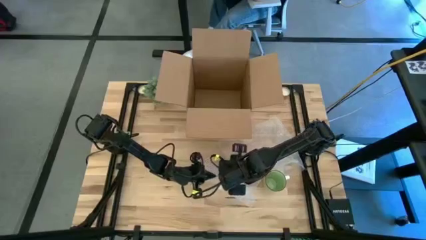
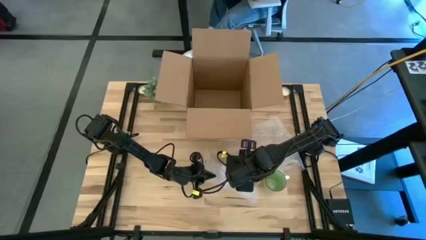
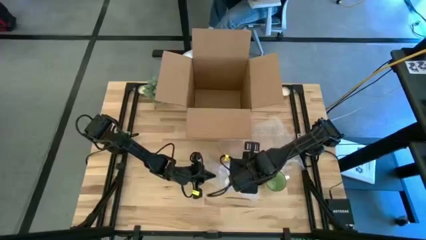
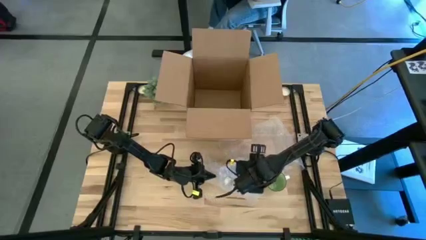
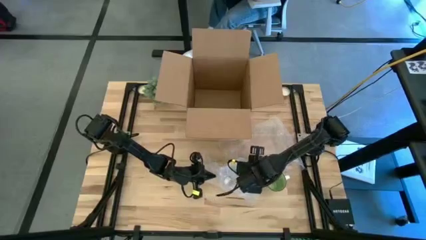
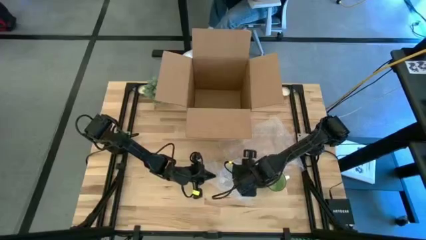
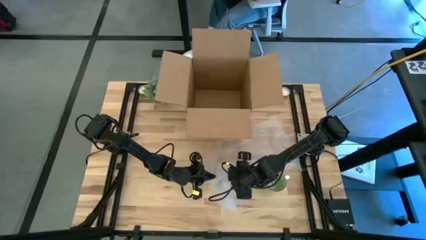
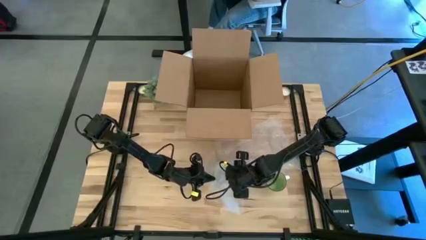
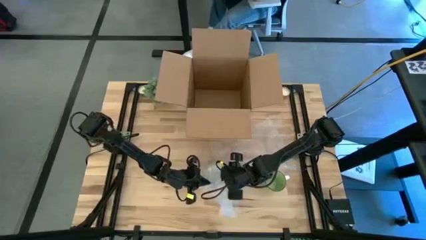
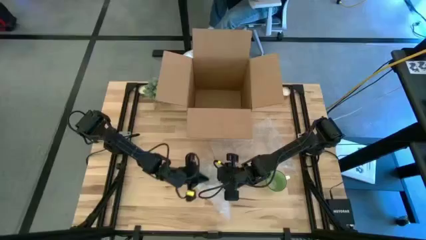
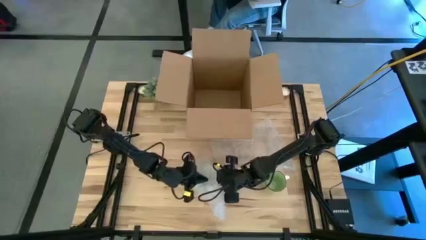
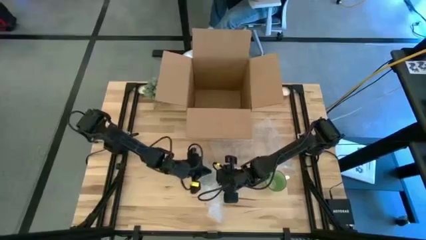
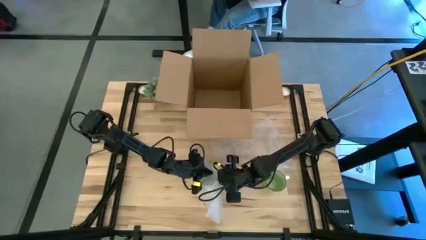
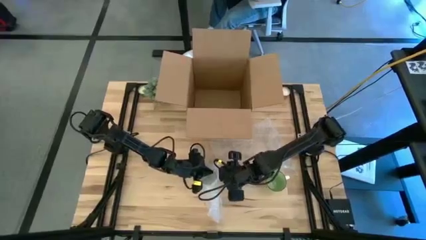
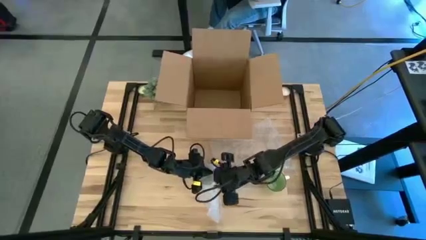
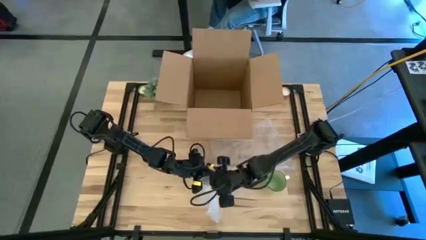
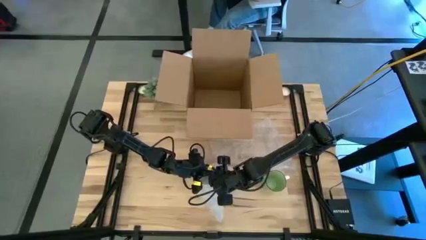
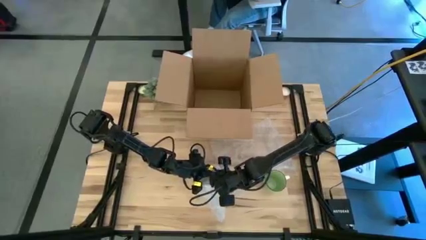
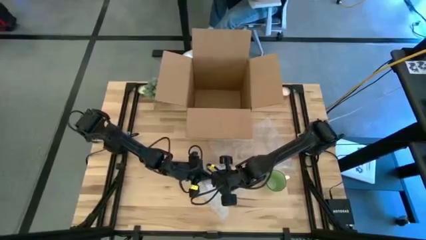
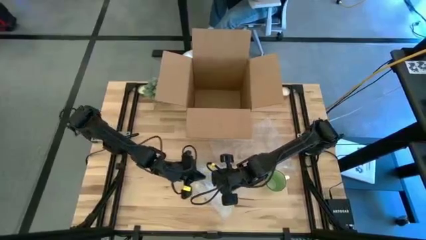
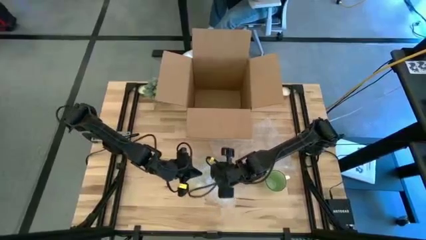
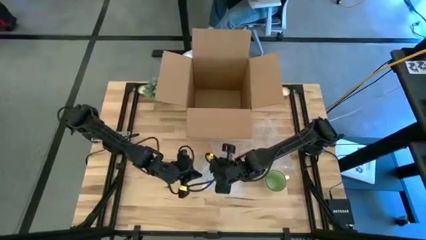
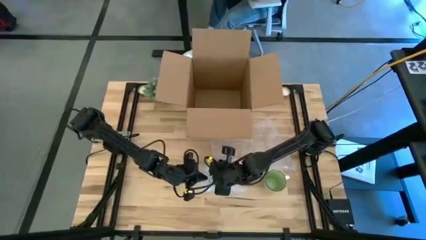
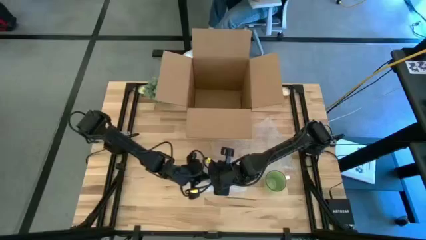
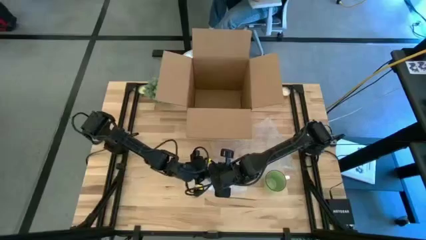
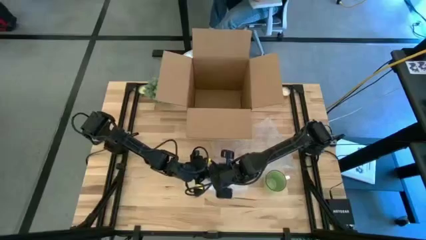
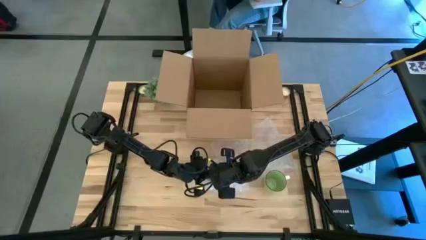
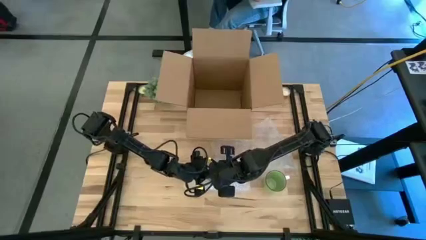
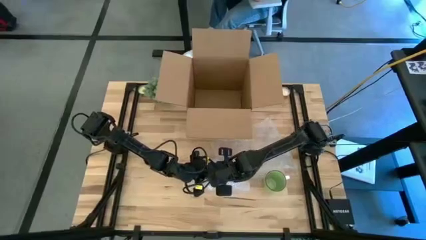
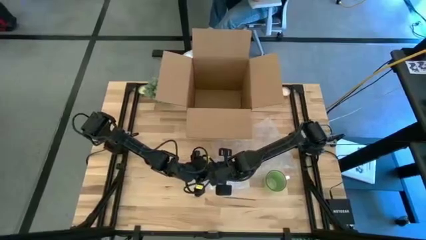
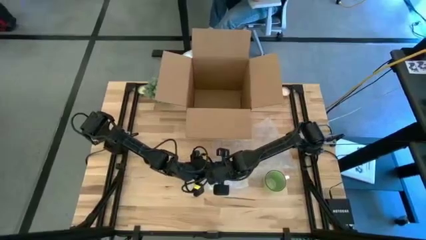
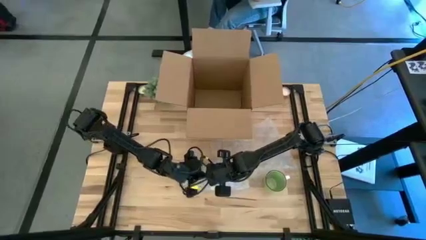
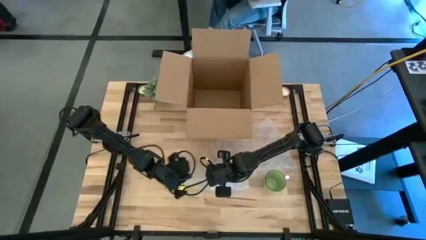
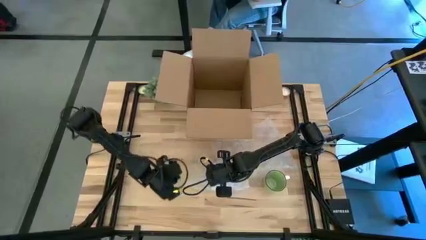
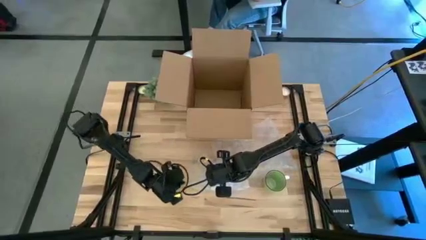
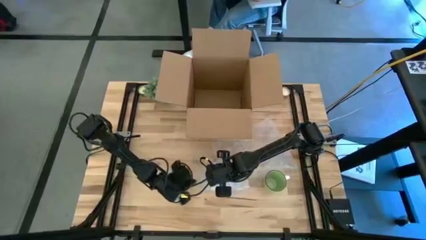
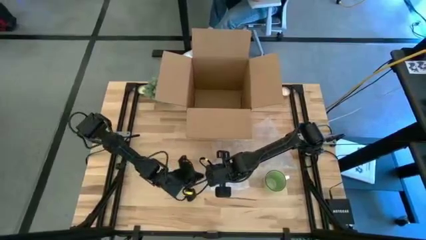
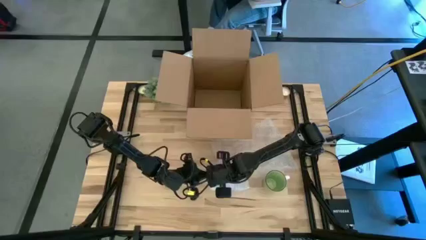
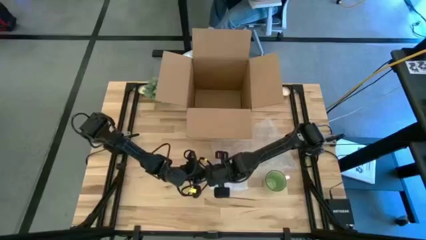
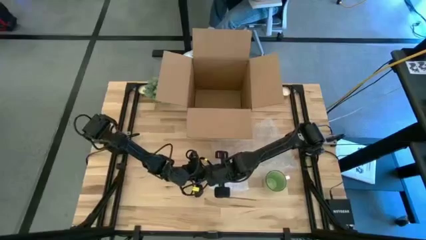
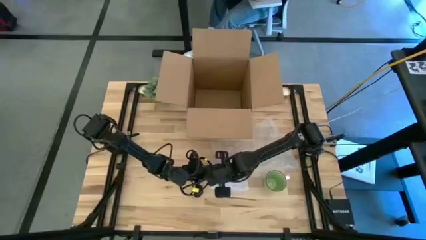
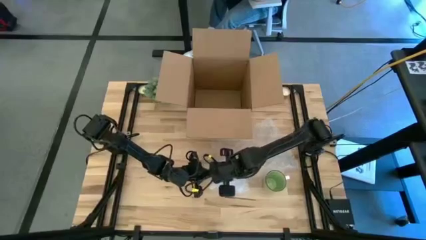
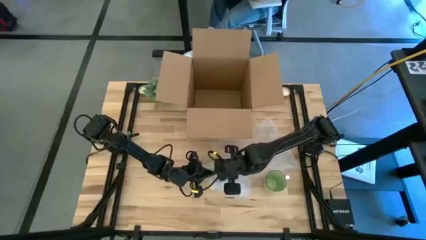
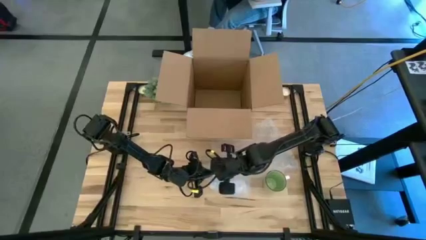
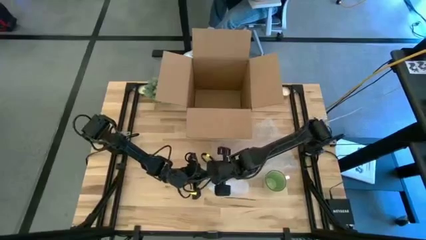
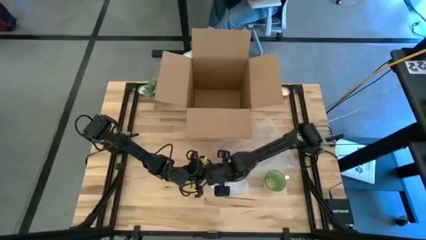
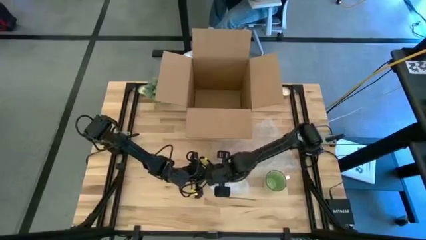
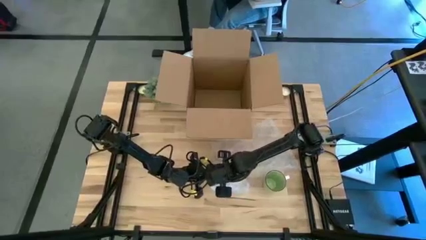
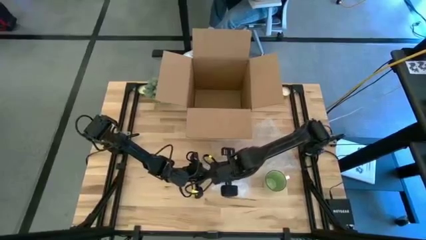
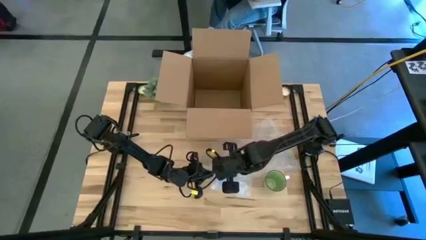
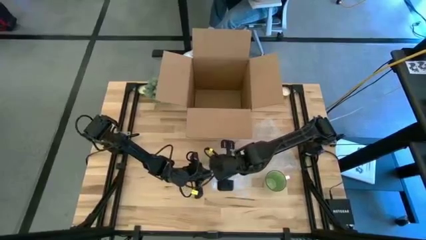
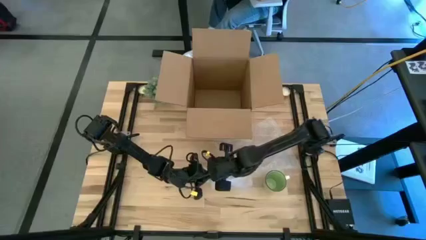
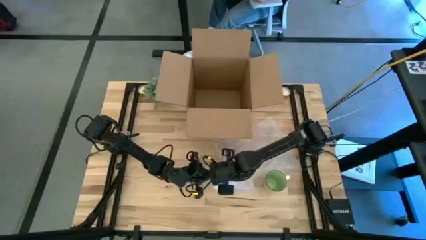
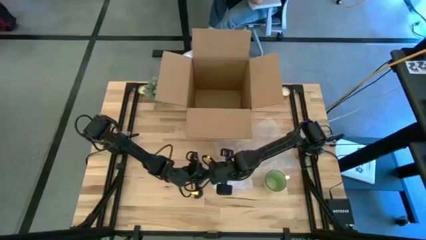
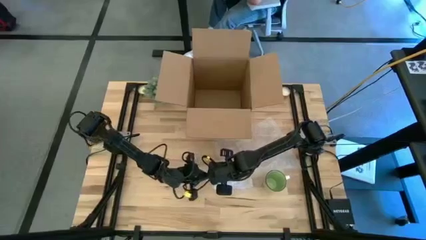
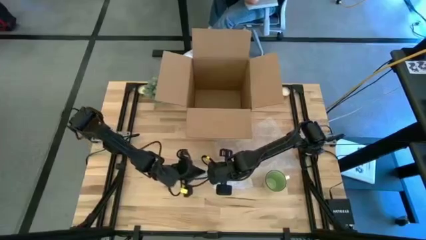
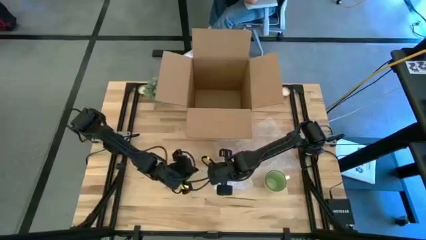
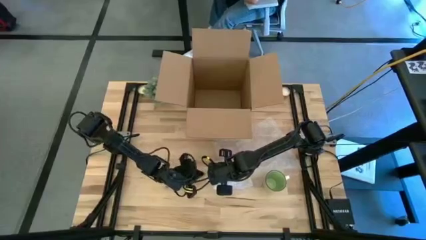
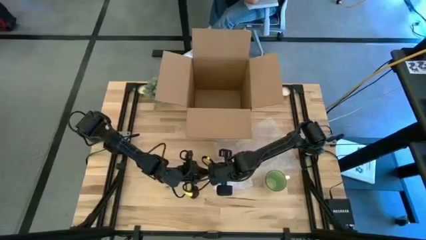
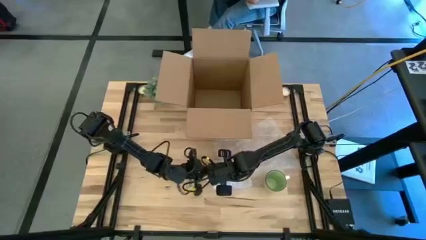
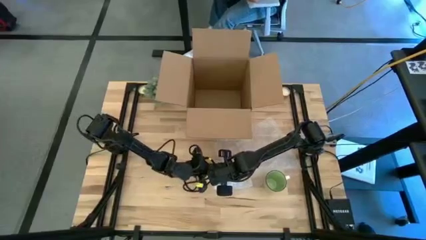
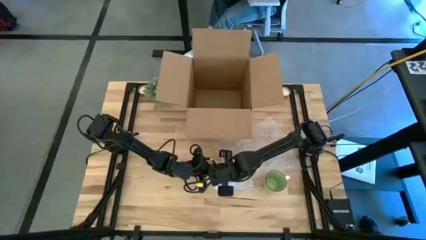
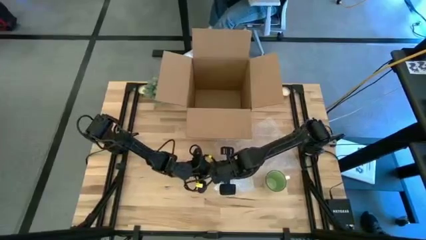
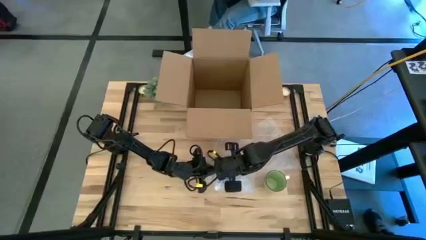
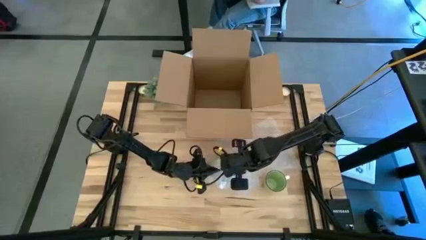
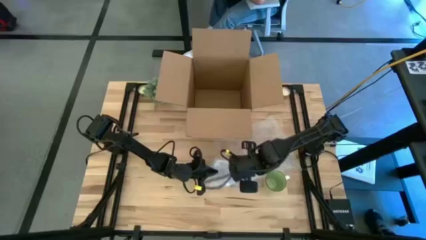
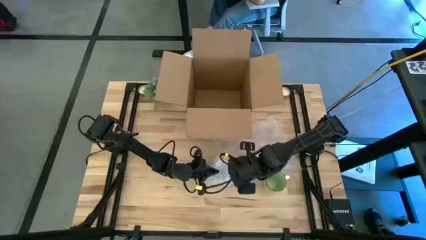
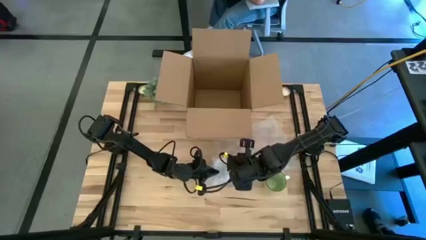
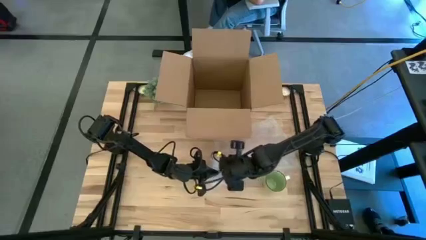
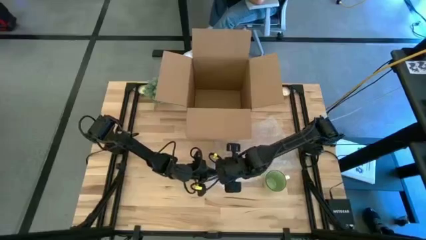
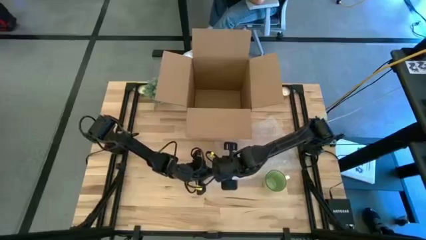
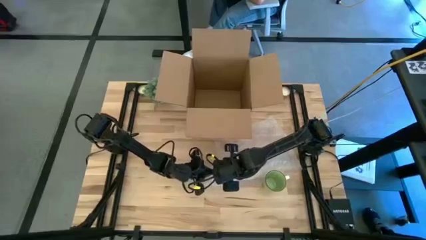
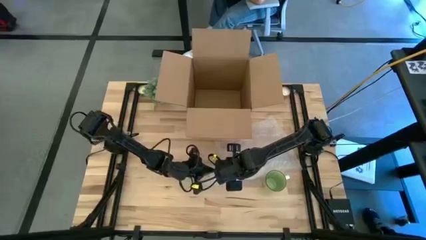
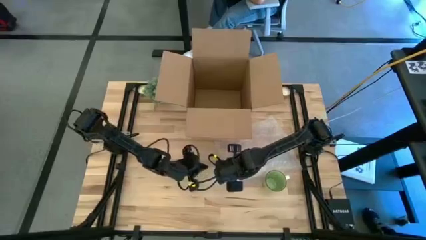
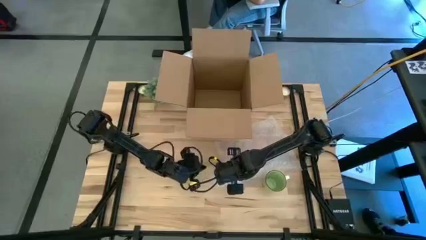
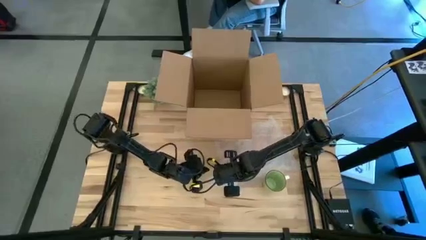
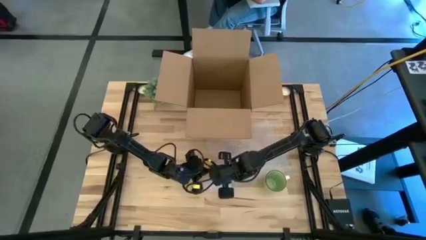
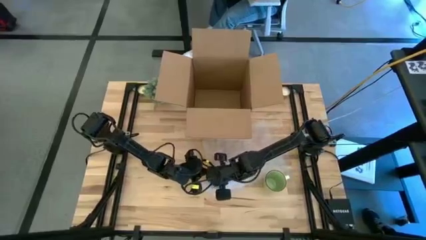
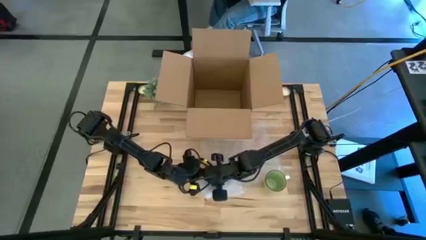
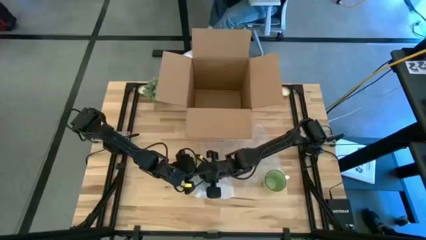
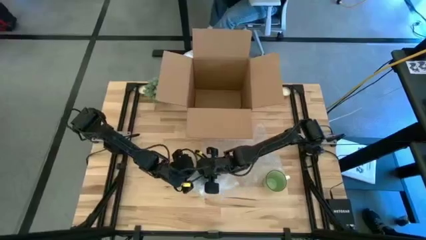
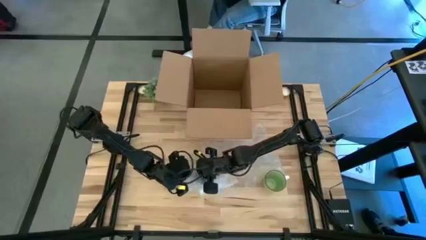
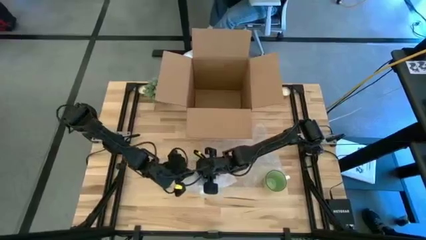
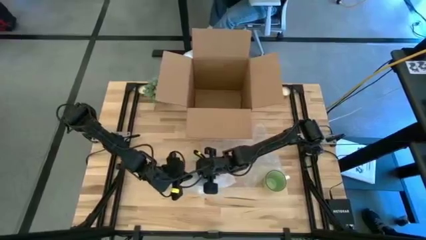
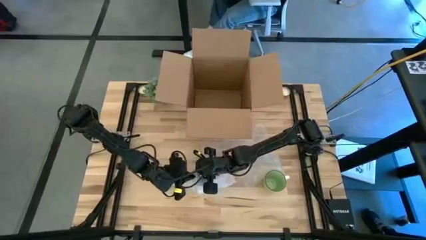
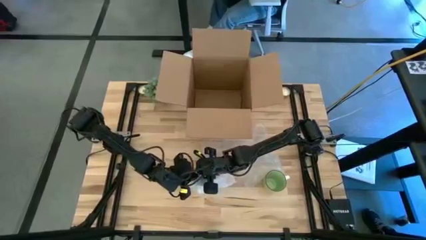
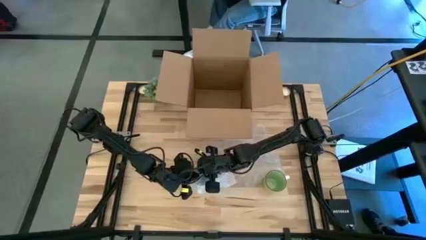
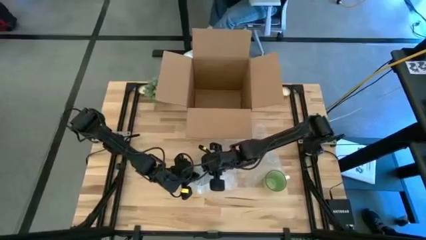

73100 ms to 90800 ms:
Task: wrap mug
Wrap the white mug with bubble wrap
